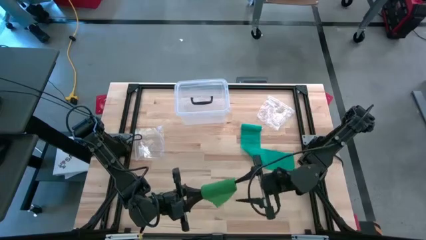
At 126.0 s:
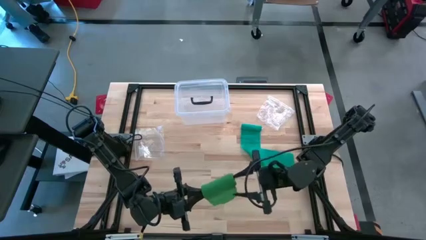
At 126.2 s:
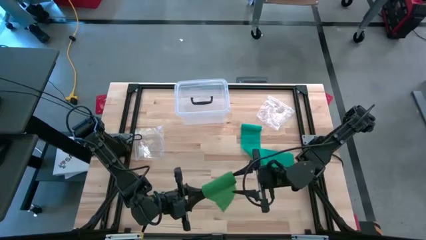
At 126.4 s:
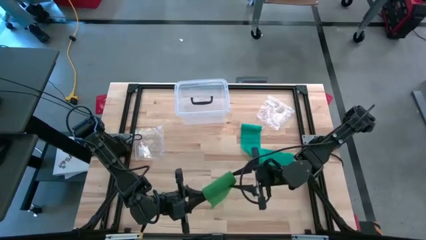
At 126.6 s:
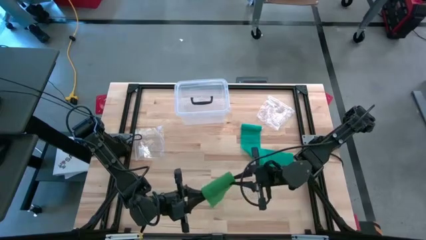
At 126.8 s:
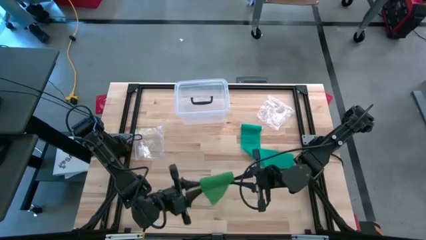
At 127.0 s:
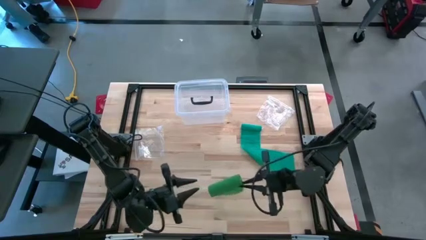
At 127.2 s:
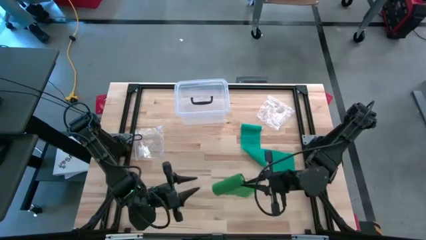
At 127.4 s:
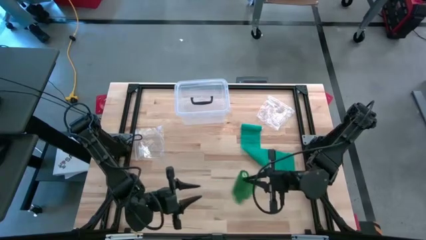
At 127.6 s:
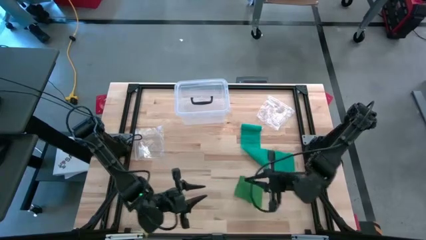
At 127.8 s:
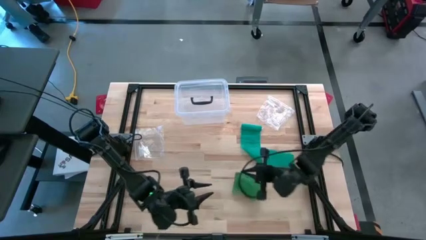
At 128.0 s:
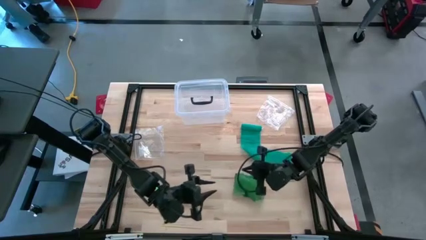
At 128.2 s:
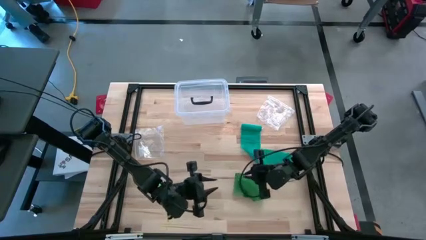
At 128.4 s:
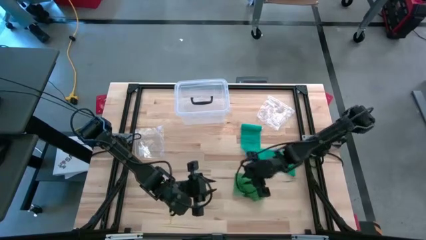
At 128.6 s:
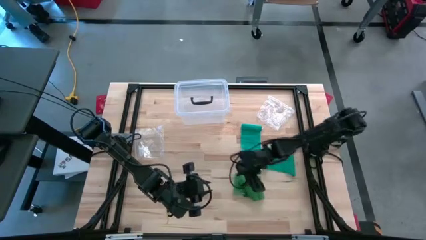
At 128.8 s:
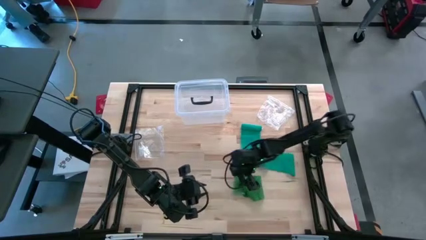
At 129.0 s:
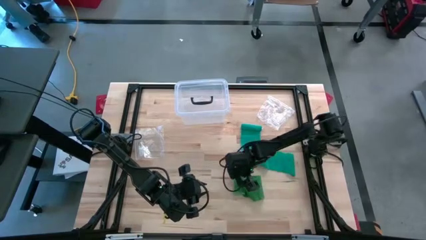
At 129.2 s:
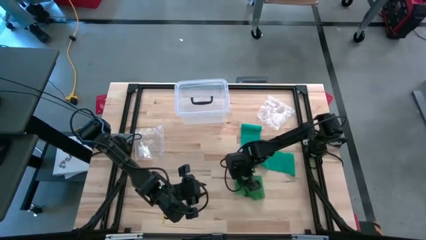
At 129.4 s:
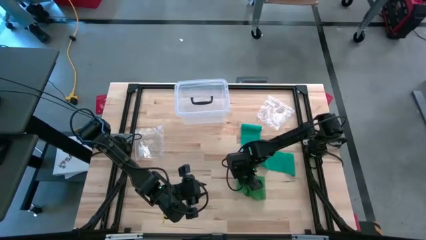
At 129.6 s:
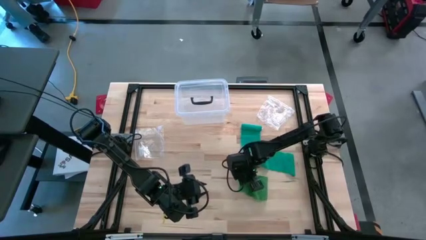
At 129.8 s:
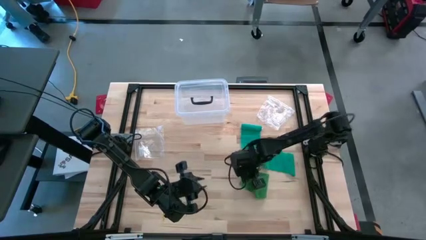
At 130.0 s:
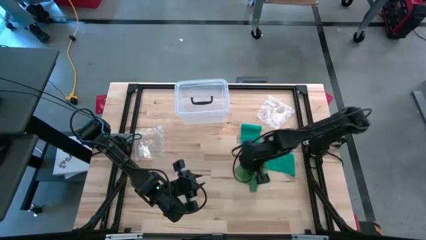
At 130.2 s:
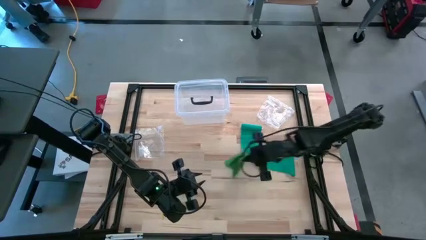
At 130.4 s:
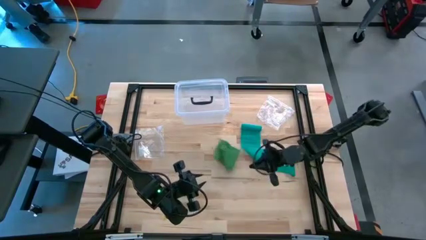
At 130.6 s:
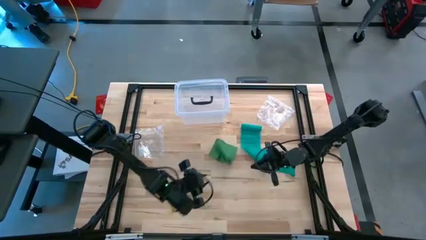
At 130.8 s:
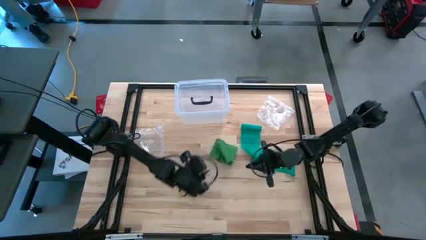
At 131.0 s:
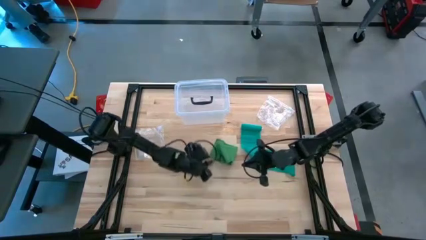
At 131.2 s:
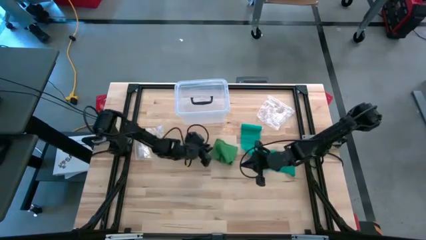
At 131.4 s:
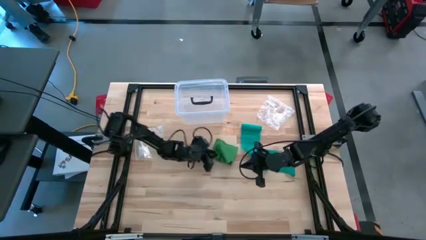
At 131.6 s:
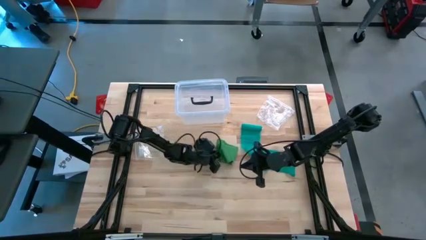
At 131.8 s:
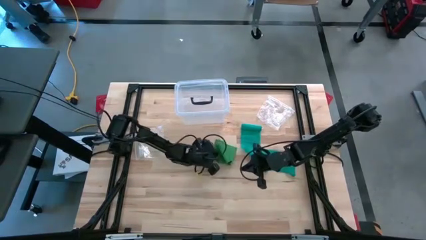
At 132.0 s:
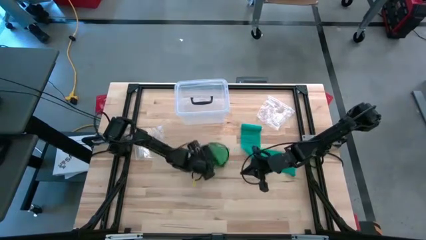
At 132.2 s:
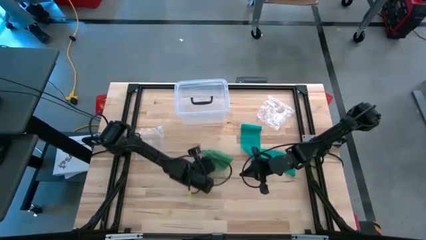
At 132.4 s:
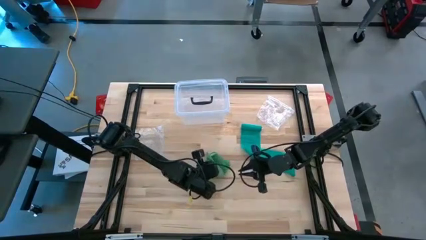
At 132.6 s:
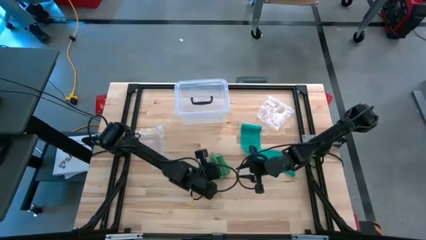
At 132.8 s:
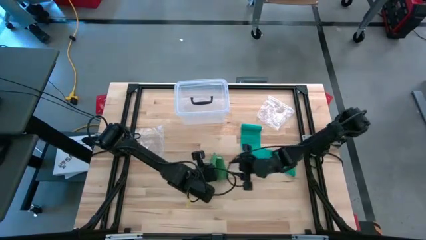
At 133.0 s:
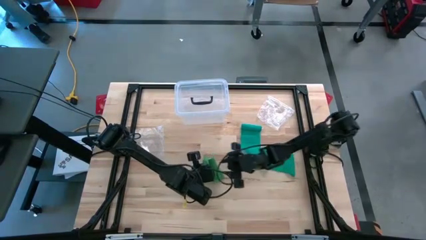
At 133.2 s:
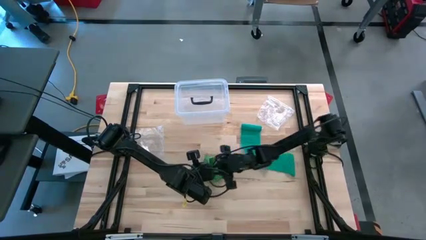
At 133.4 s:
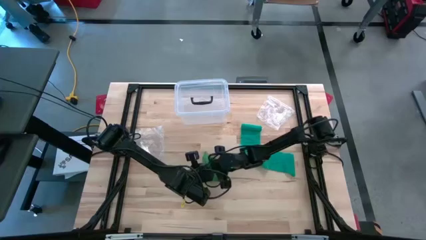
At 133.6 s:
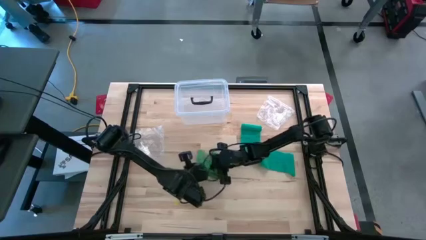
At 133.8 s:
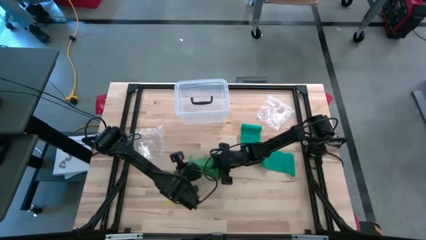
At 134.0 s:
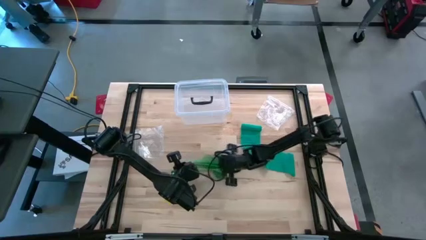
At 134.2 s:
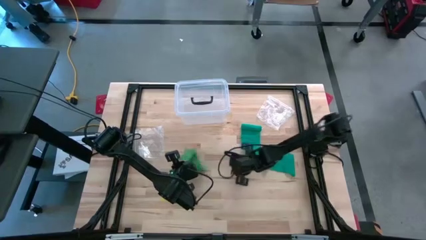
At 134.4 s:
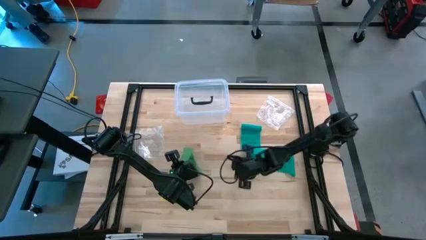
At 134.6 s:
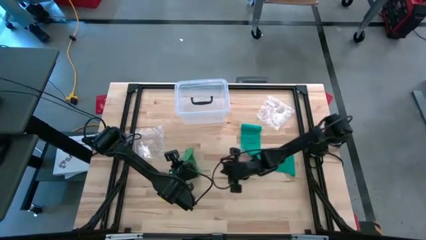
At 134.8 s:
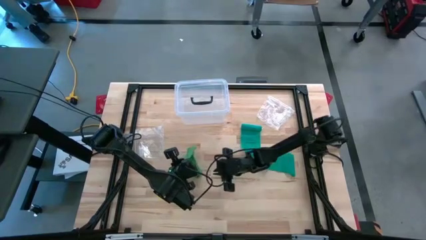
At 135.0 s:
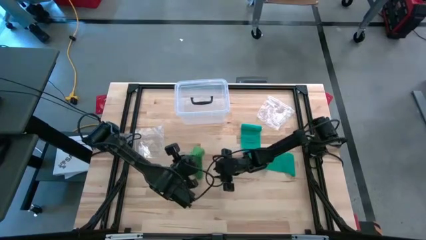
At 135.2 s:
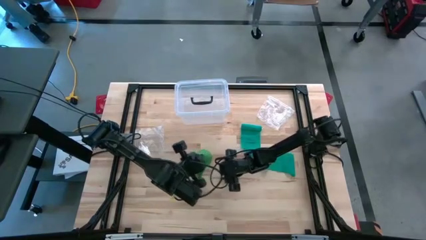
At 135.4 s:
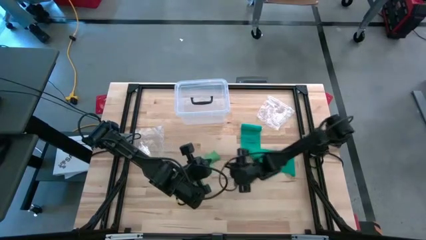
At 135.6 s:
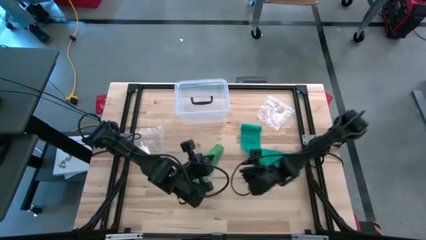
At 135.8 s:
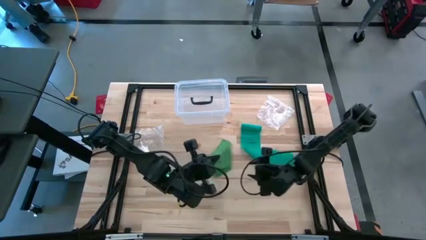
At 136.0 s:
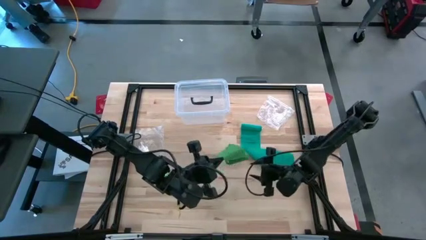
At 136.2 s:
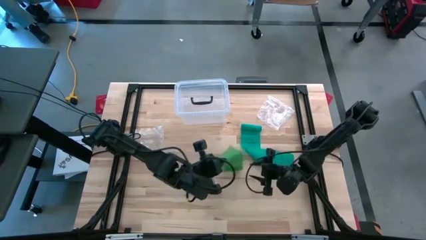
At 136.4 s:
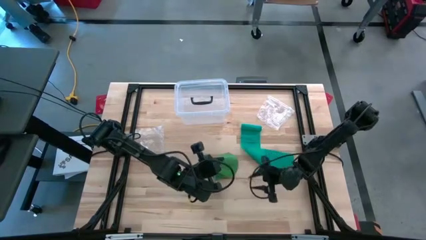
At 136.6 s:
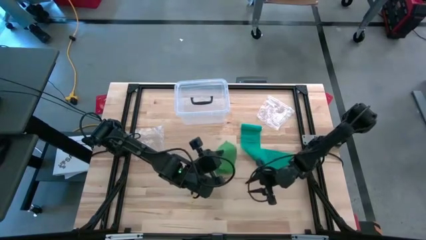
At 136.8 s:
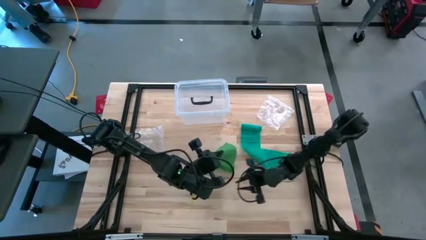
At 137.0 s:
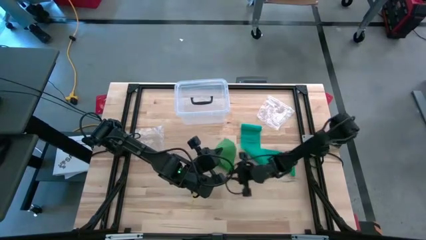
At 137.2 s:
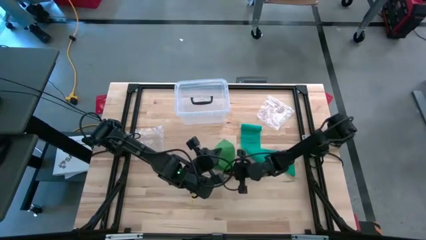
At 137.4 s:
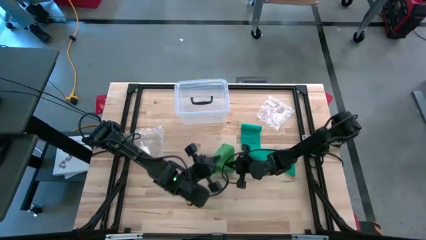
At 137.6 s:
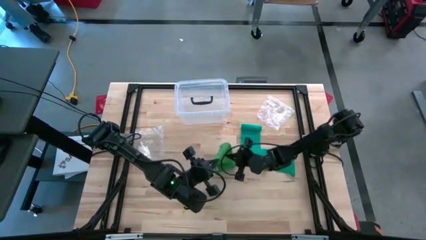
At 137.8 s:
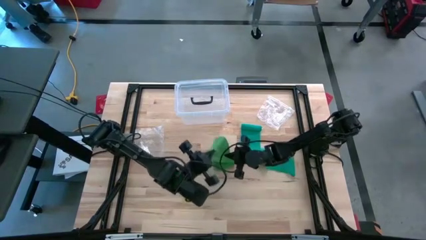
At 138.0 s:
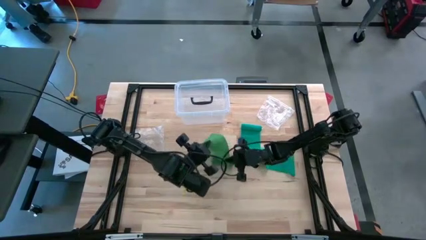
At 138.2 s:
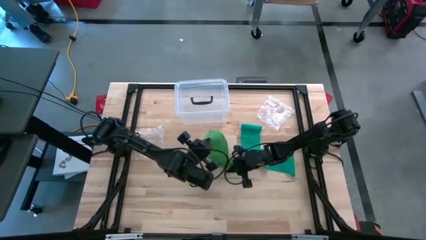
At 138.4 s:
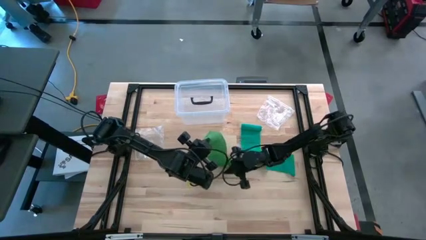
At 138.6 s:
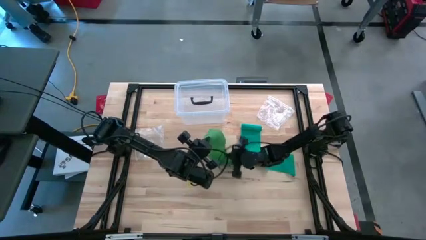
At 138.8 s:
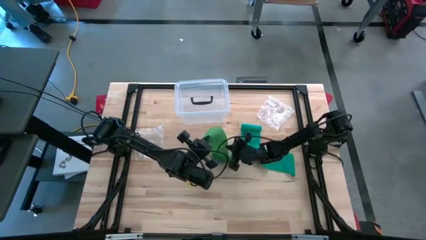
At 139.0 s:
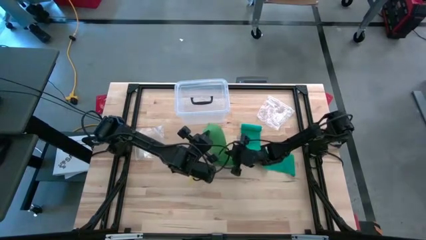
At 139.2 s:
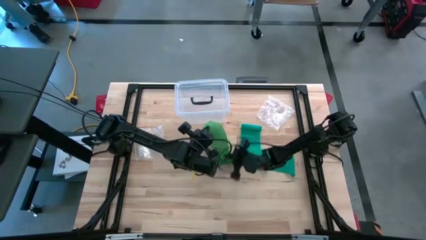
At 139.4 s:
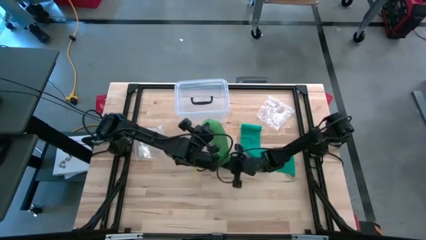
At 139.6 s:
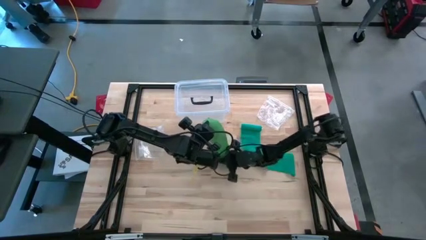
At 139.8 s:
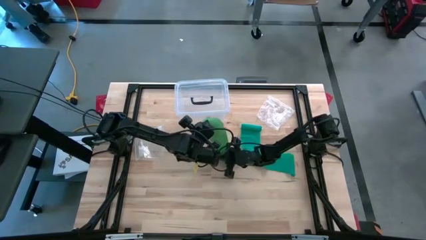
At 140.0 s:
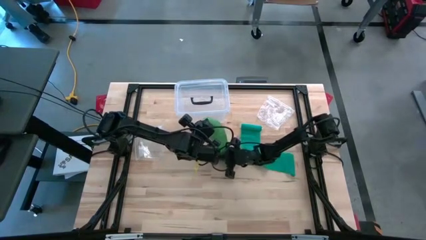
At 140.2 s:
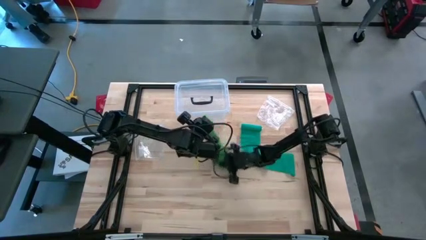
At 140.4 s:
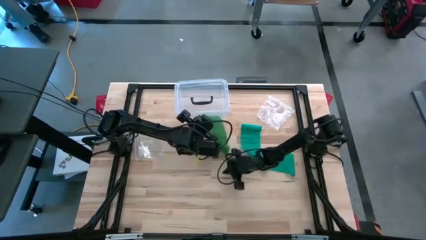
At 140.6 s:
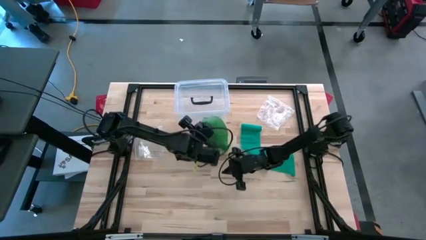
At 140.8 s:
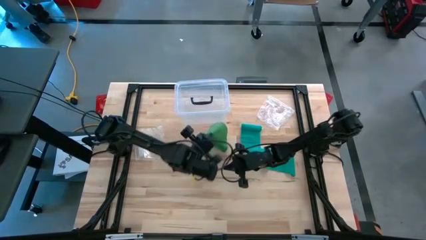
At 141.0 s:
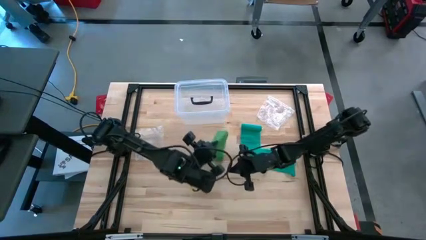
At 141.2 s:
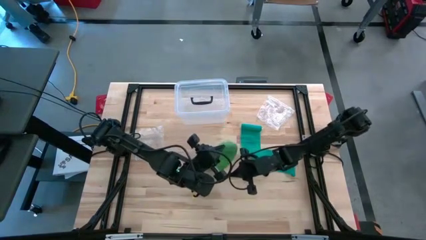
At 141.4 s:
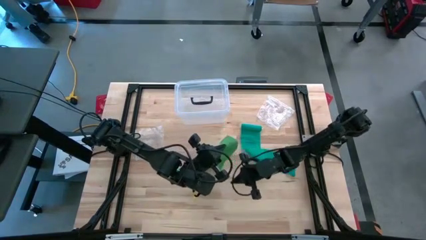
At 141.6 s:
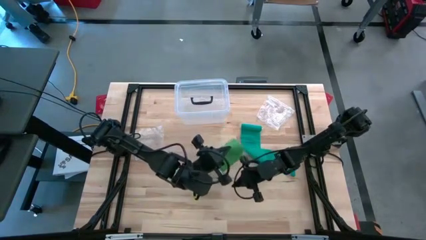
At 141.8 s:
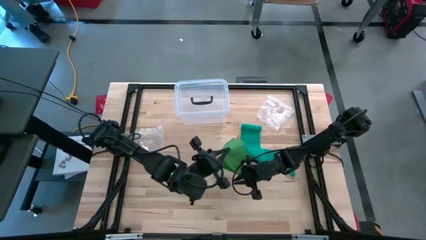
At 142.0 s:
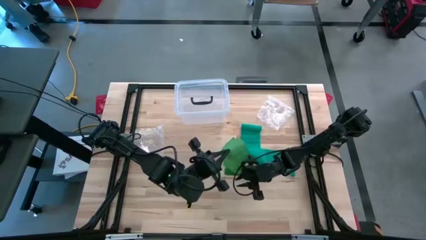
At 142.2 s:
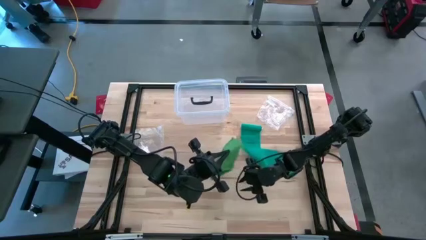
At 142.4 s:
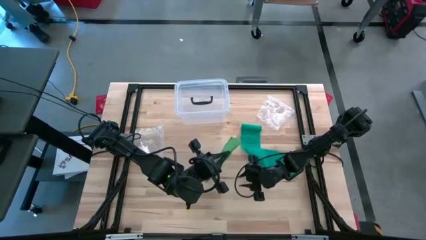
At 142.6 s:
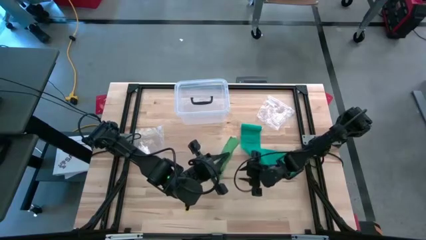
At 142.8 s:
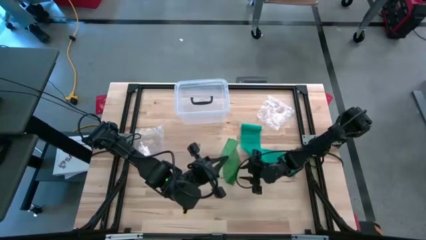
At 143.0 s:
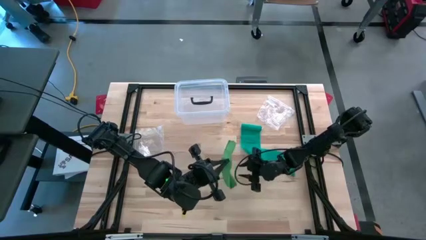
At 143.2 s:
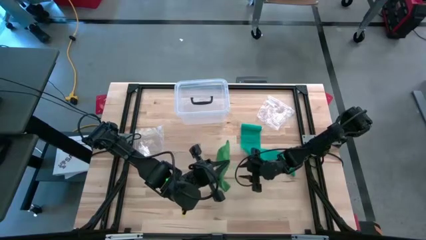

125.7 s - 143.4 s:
Task: Roll bandage
Roll the green bandage
